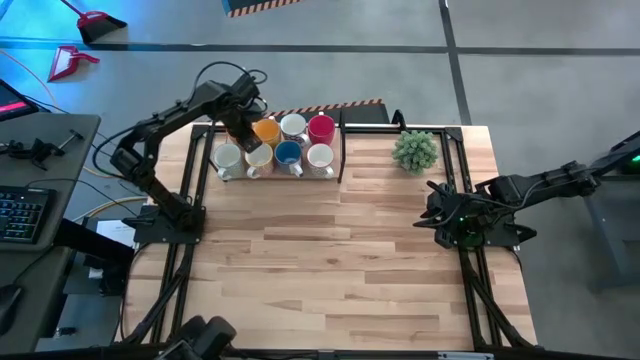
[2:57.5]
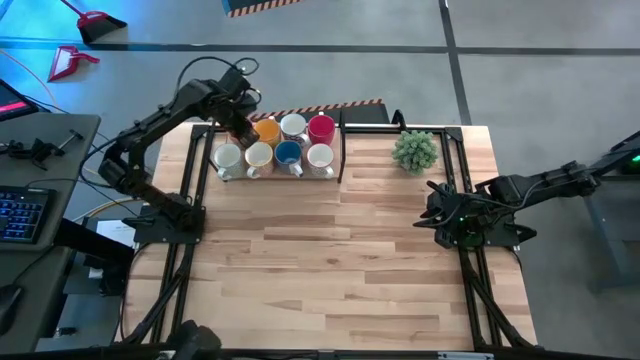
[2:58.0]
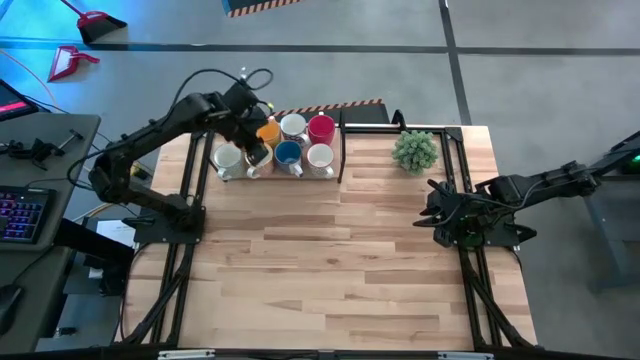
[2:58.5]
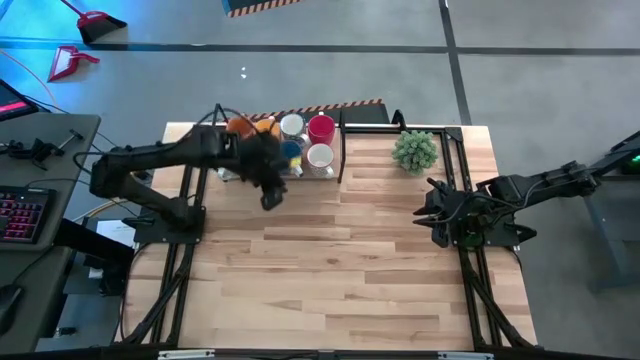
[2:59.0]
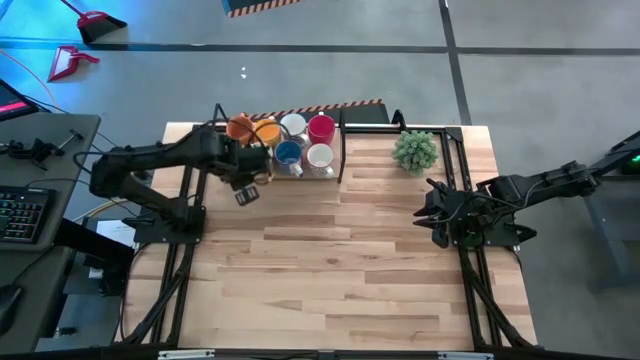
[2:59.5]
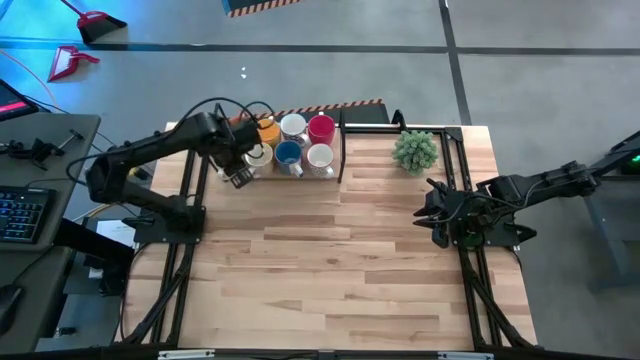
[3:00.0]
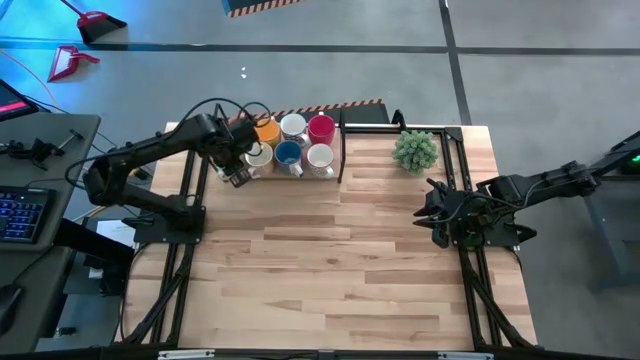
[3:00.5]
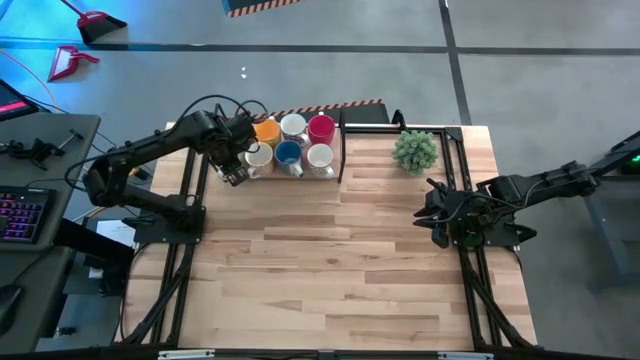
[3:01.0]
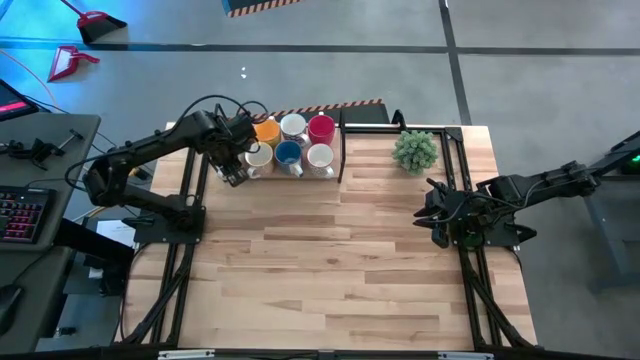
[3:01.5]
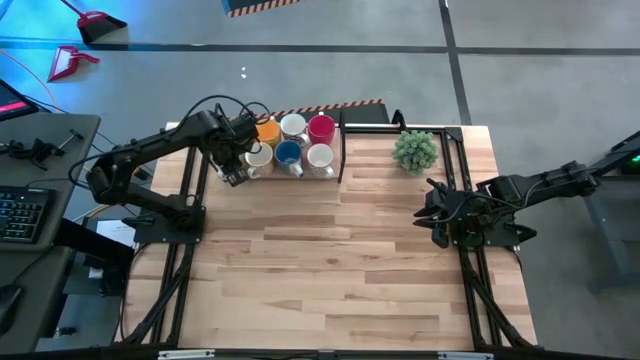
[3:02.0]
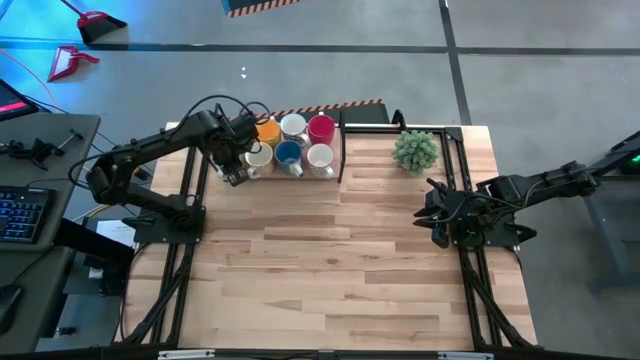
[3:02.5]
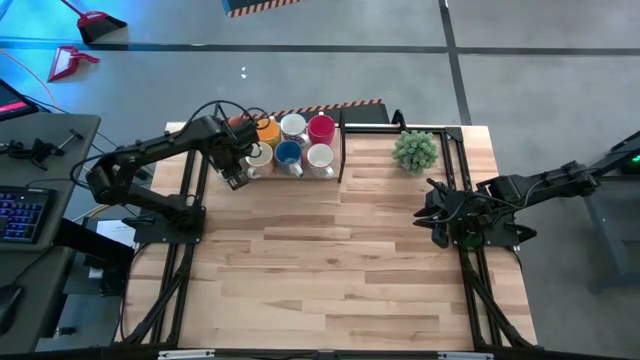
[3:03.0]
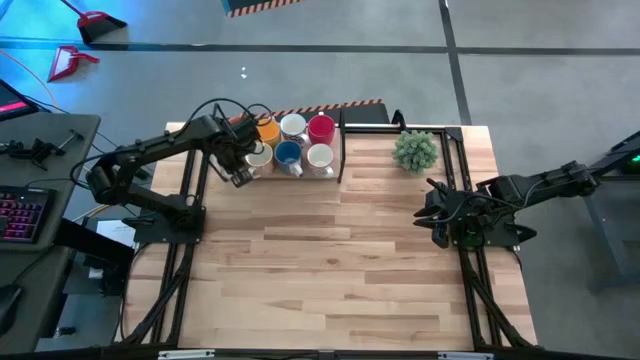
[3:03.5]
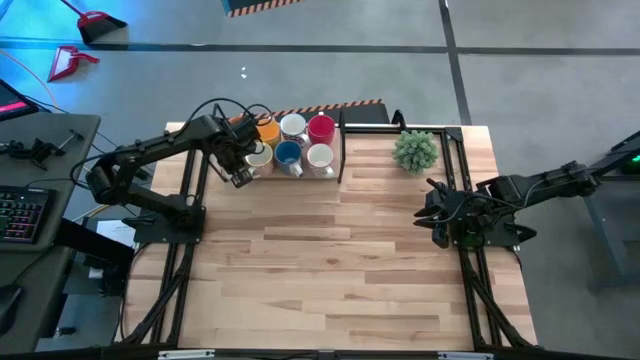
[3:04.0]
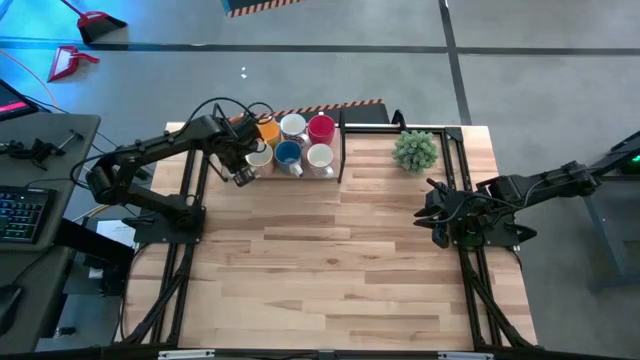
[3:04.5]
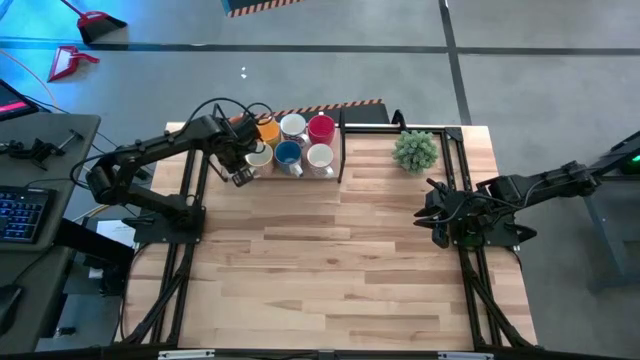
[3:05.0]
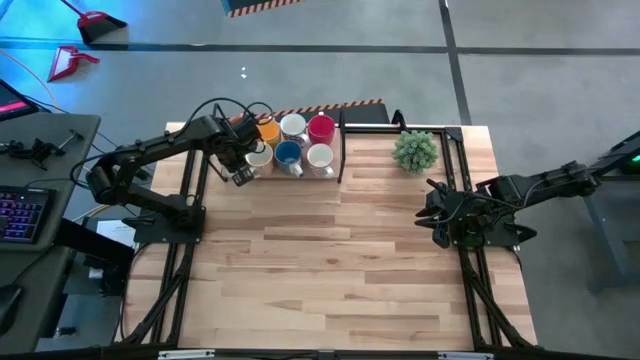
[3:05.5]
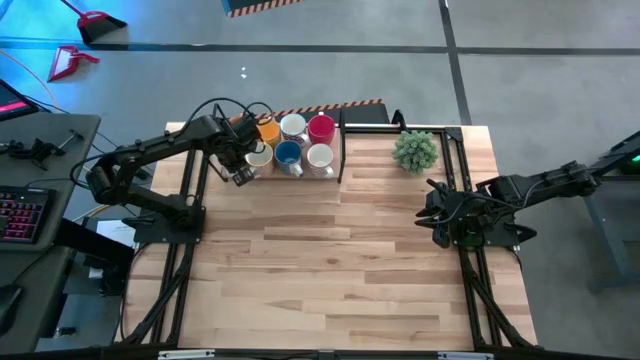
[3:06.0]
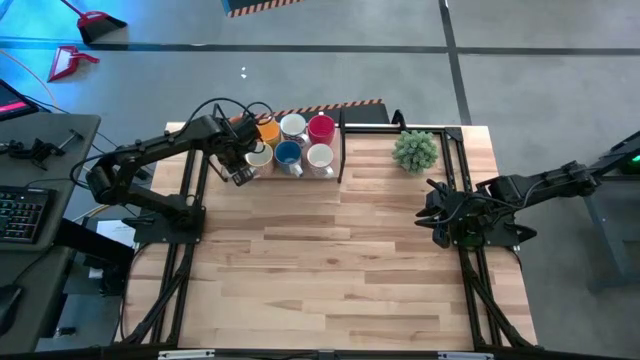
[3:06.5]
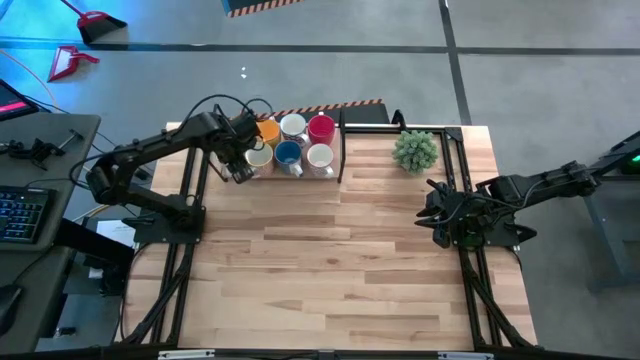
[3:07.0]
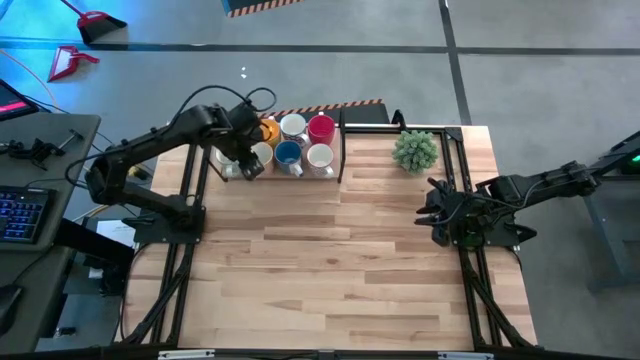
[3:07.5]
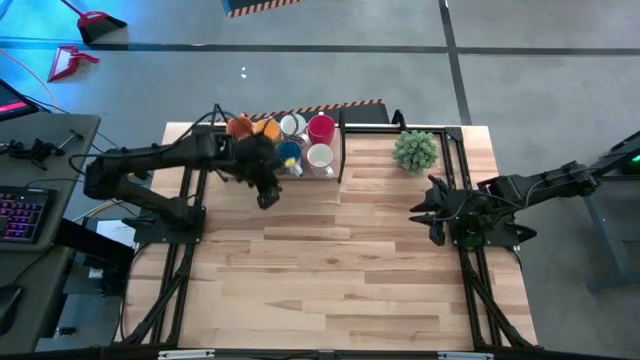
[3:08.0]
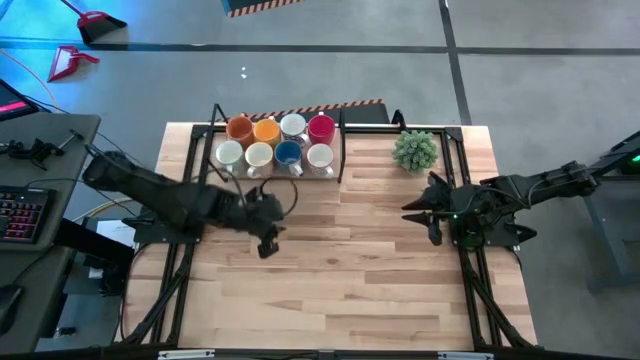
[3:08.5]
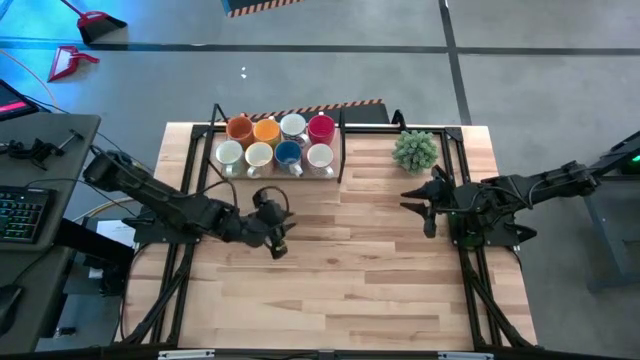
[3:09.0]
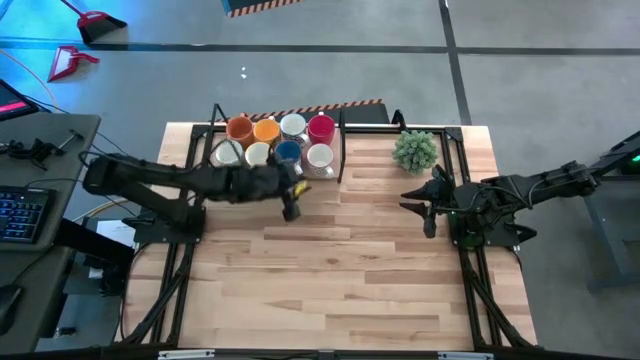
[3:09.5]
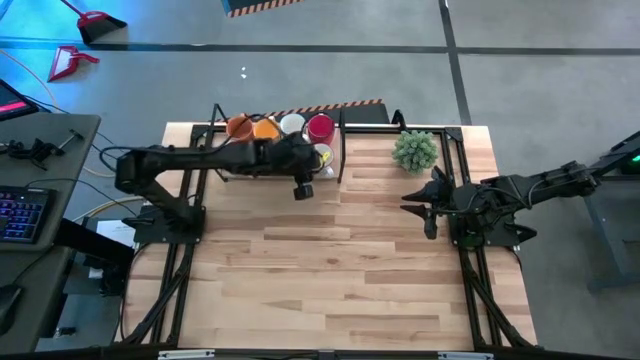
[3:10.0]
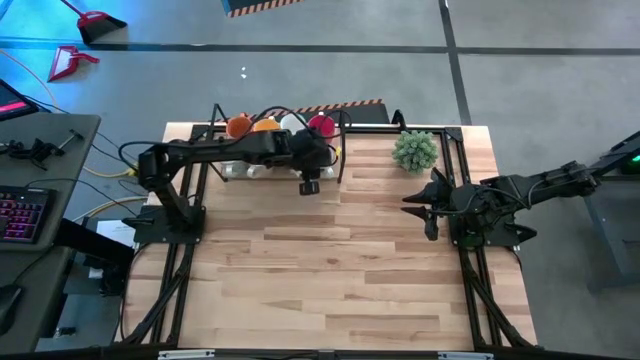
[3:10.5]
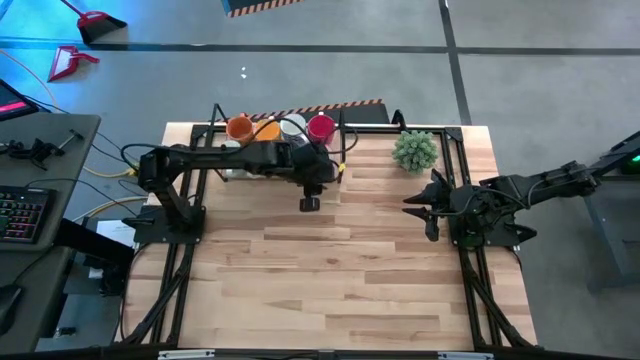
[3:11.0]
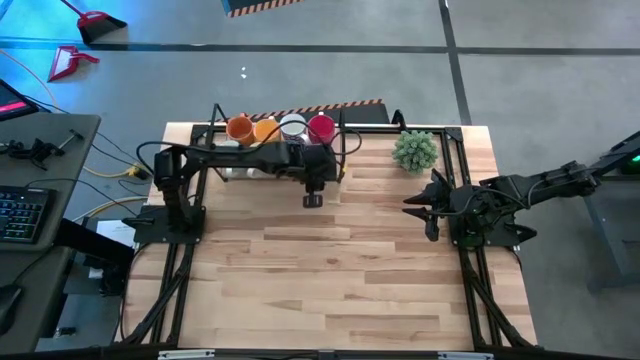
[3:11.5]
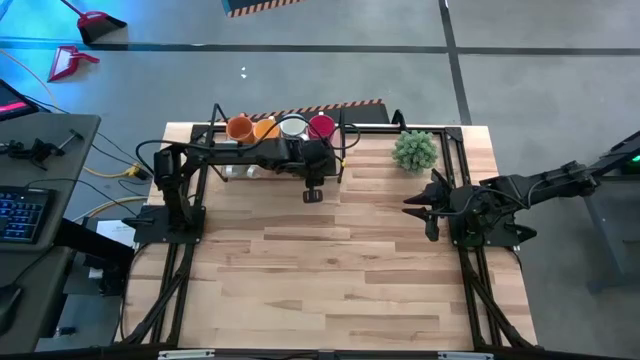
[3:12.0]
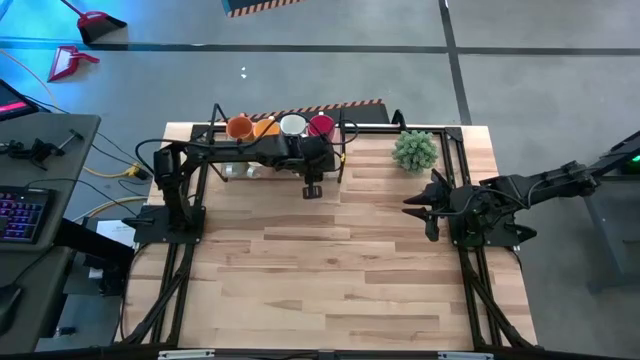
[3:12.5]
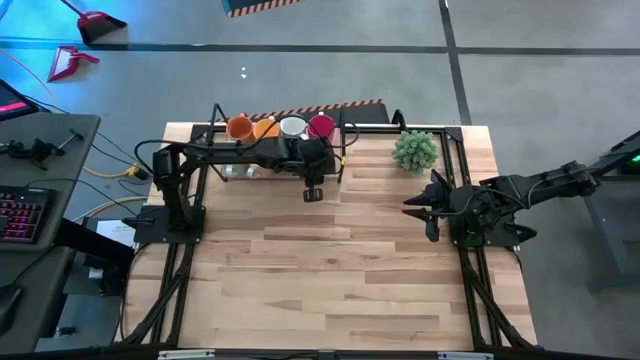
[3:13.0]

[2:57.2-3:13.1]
Task: Place coffee mugs
Adjust the mugs on the shelf

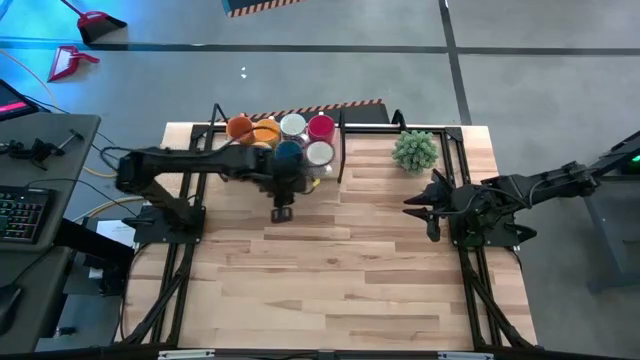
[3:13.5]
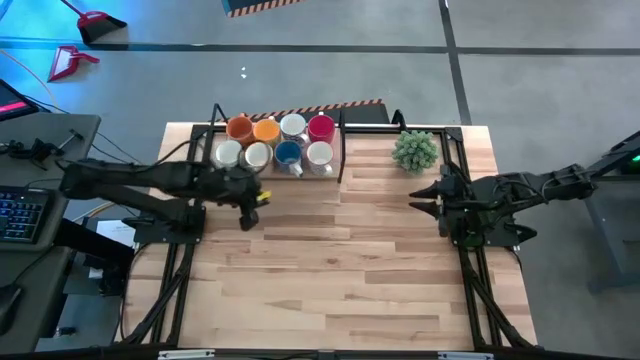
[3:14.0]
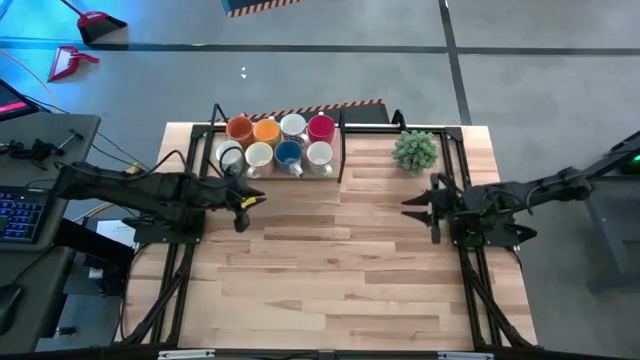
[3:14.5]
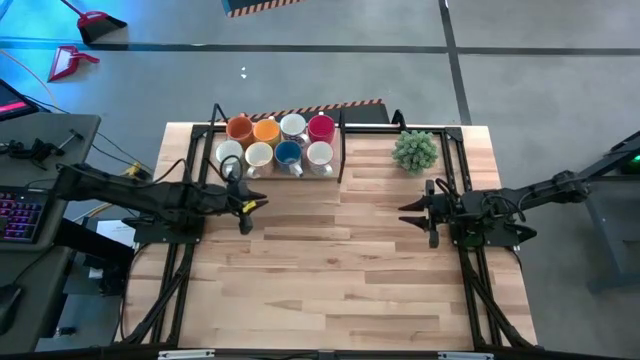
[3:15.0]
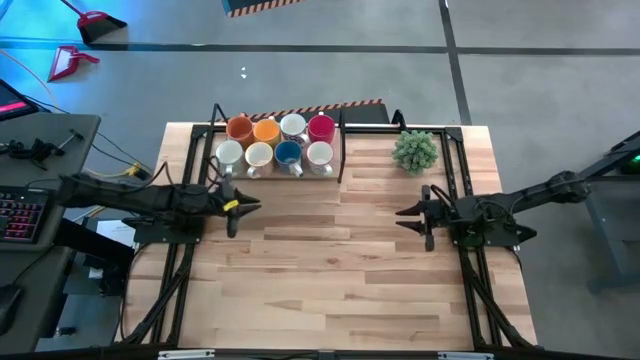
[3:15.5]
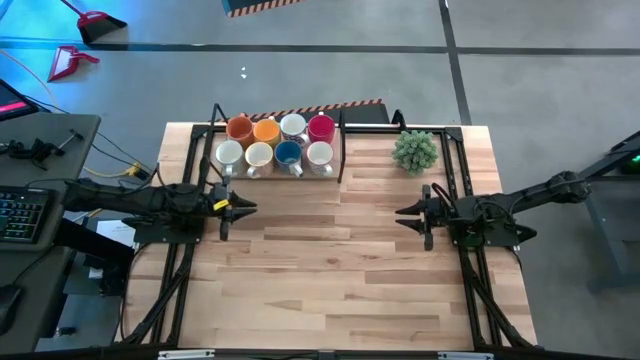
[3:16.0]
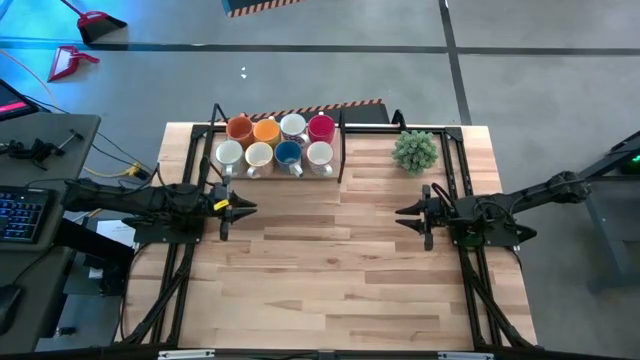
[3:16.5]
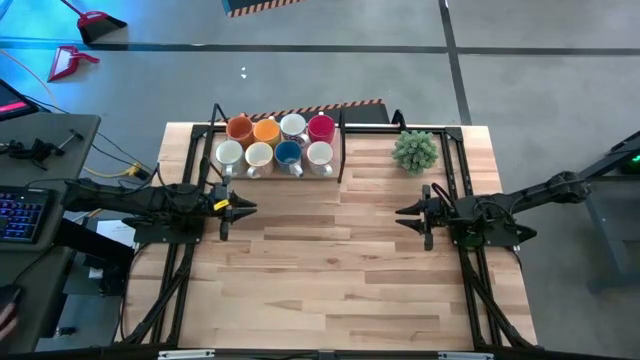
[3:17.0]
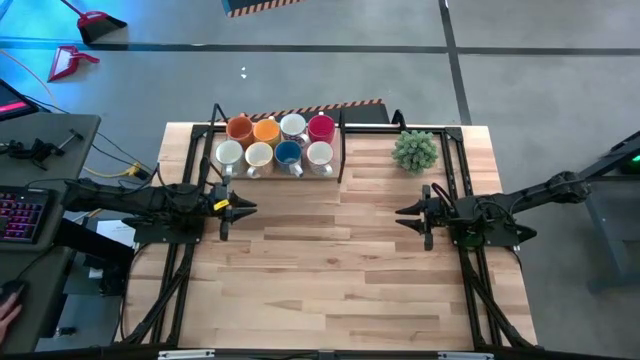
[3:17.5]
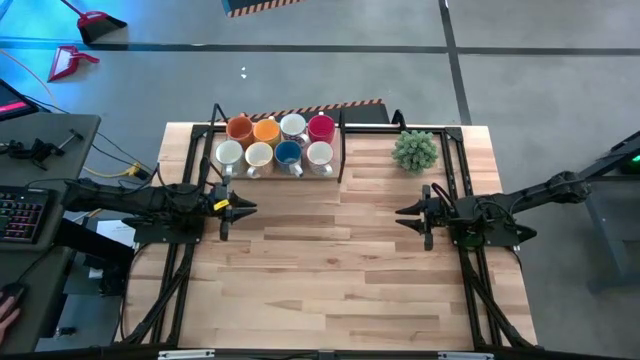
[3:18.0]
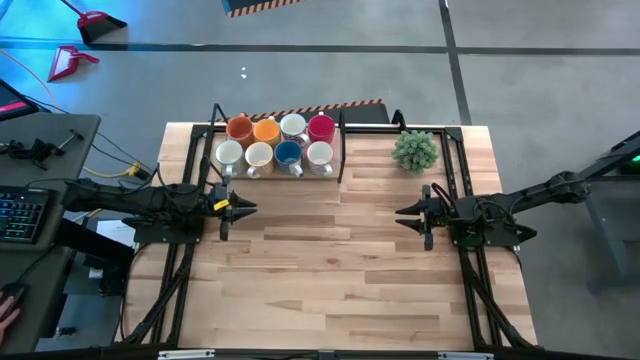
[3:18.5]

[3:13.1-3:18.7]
Return to Home Position
